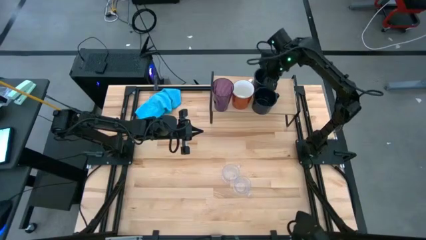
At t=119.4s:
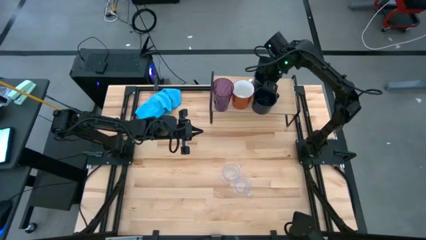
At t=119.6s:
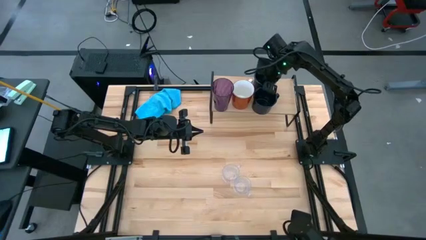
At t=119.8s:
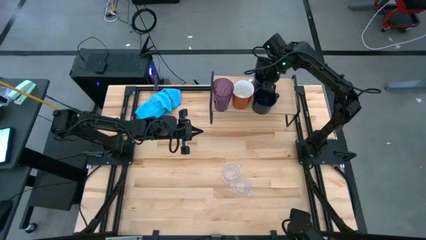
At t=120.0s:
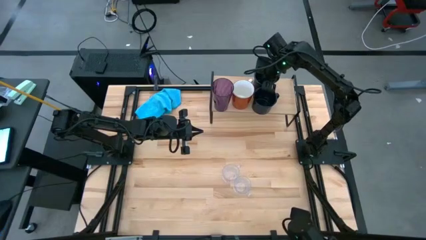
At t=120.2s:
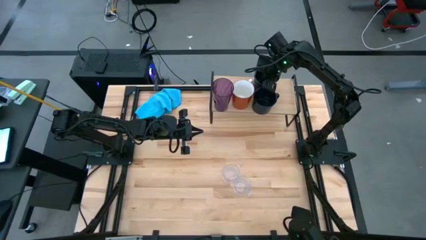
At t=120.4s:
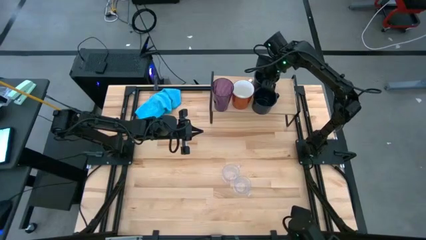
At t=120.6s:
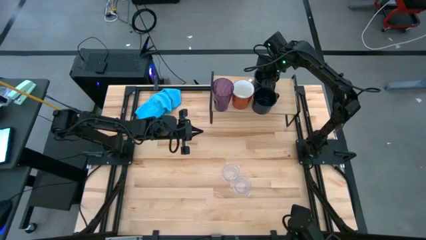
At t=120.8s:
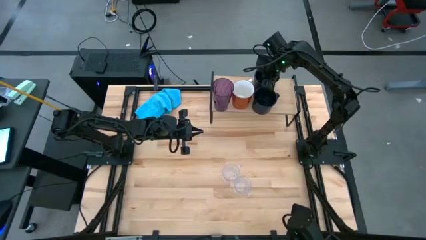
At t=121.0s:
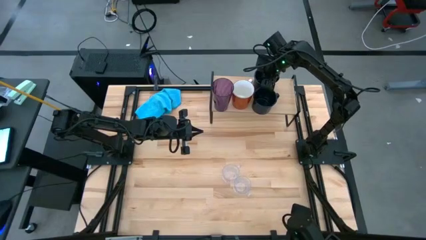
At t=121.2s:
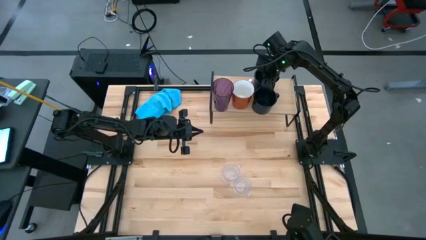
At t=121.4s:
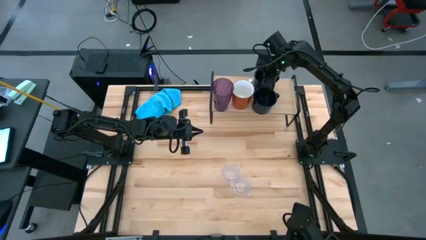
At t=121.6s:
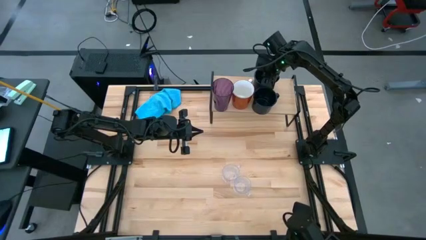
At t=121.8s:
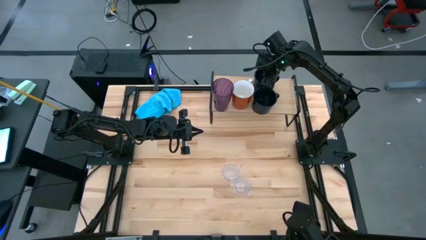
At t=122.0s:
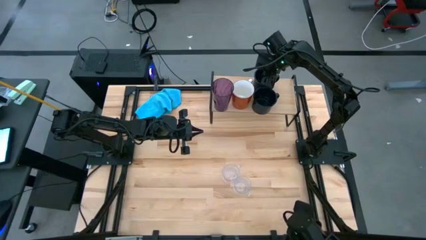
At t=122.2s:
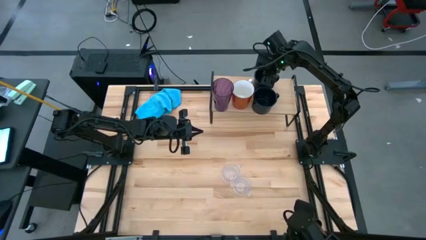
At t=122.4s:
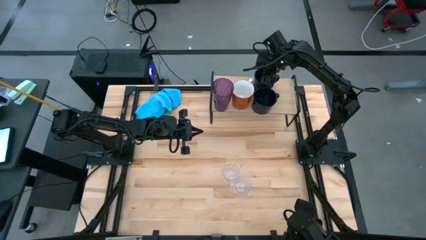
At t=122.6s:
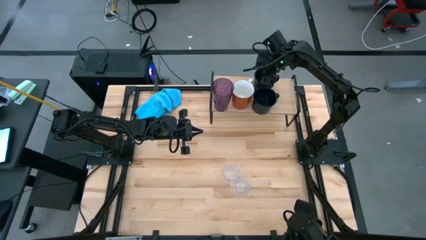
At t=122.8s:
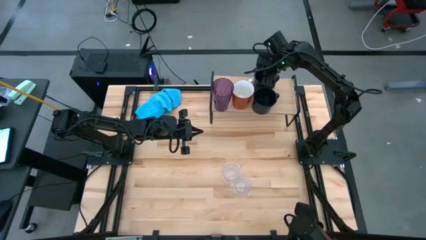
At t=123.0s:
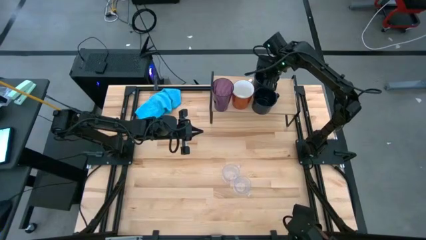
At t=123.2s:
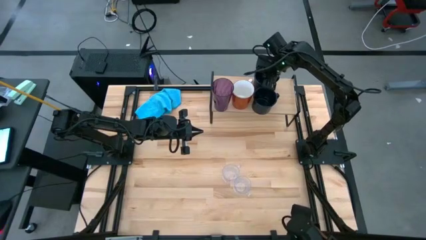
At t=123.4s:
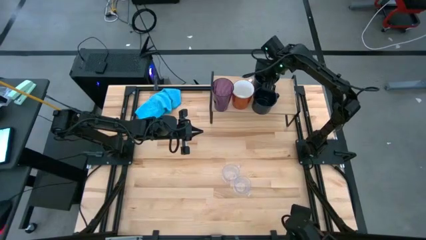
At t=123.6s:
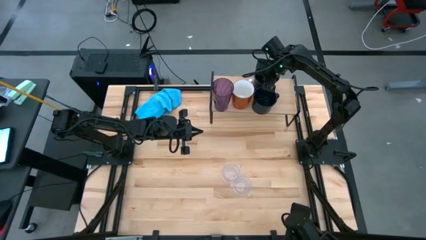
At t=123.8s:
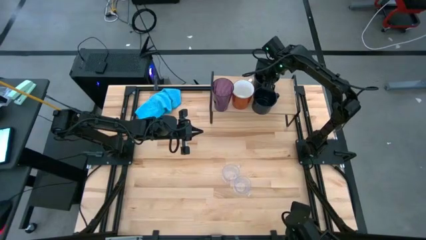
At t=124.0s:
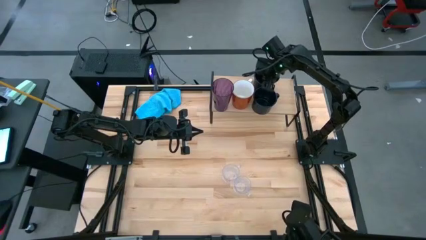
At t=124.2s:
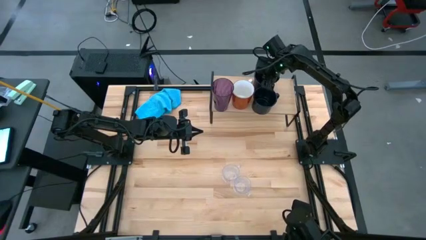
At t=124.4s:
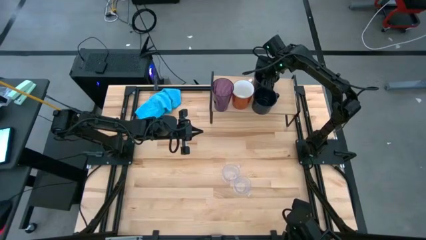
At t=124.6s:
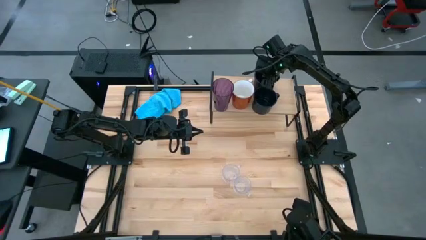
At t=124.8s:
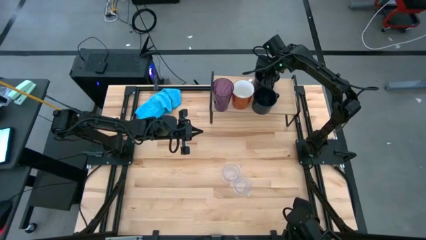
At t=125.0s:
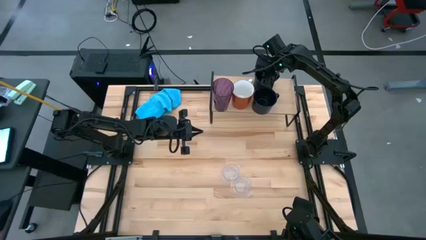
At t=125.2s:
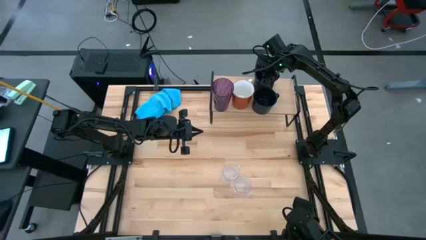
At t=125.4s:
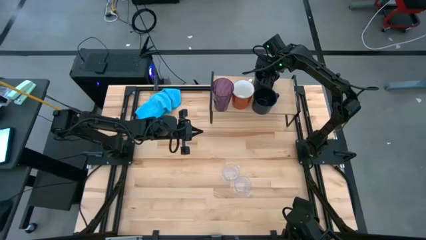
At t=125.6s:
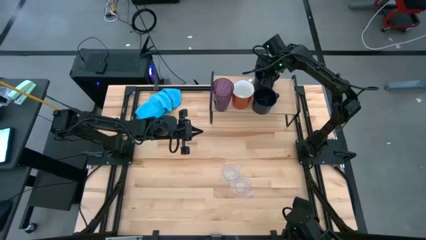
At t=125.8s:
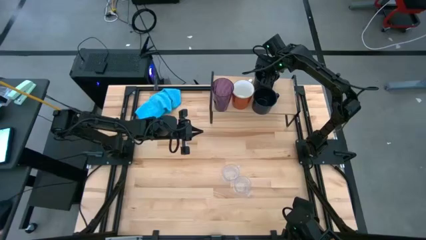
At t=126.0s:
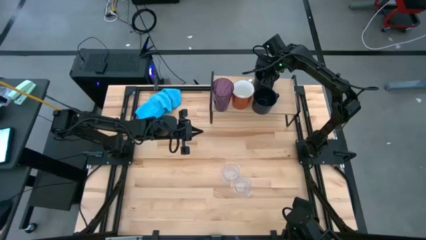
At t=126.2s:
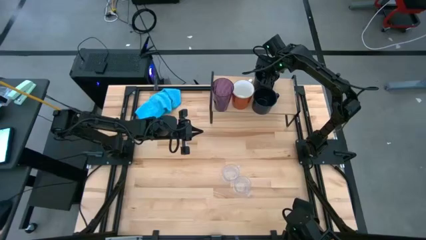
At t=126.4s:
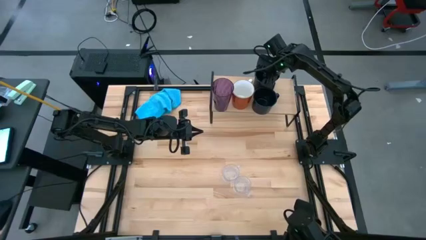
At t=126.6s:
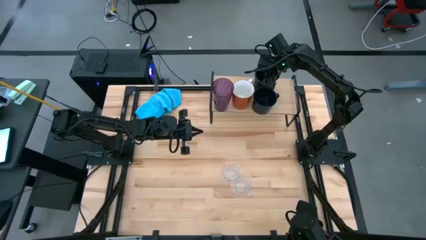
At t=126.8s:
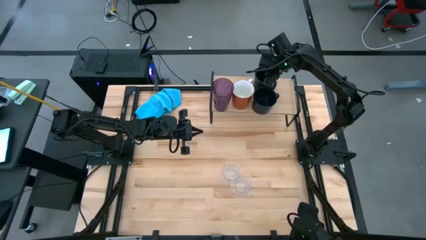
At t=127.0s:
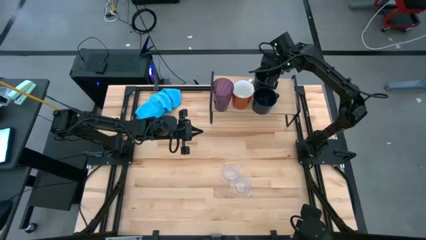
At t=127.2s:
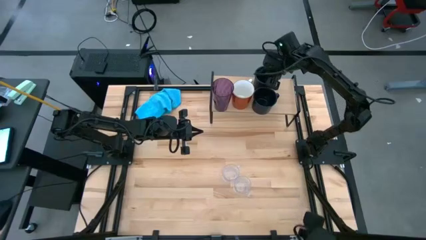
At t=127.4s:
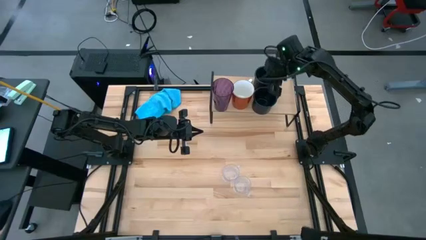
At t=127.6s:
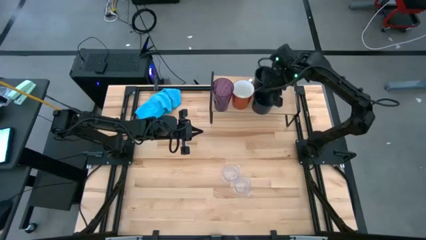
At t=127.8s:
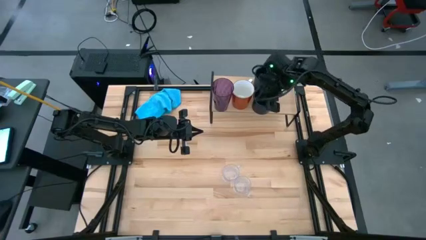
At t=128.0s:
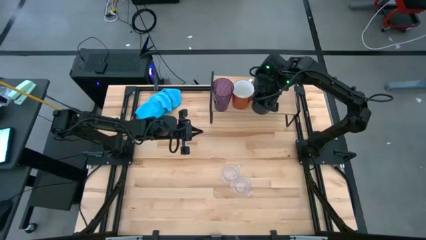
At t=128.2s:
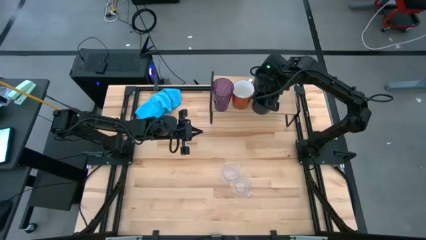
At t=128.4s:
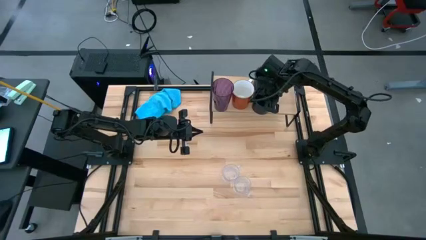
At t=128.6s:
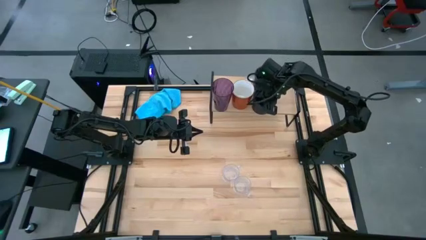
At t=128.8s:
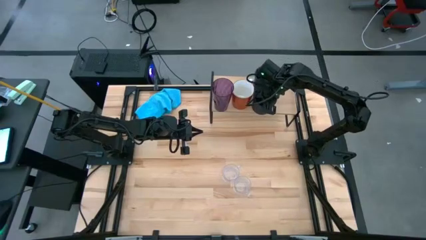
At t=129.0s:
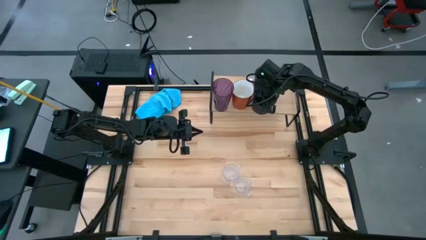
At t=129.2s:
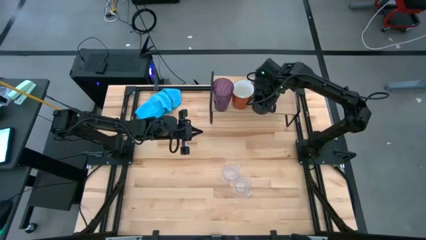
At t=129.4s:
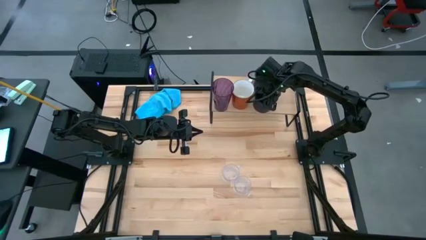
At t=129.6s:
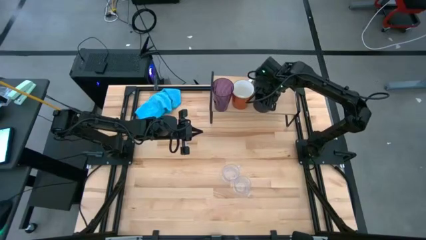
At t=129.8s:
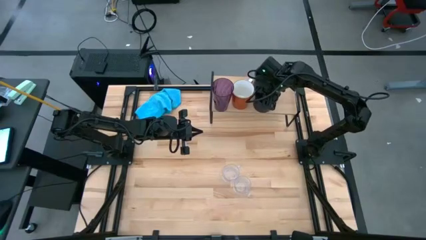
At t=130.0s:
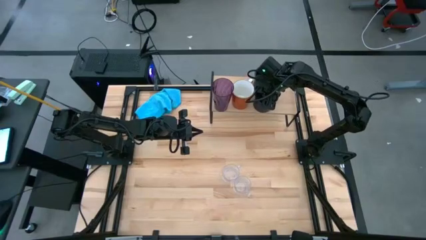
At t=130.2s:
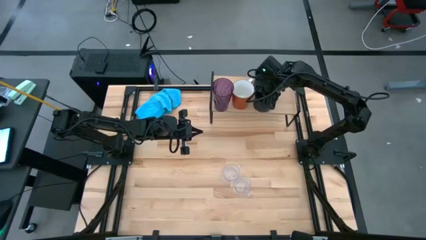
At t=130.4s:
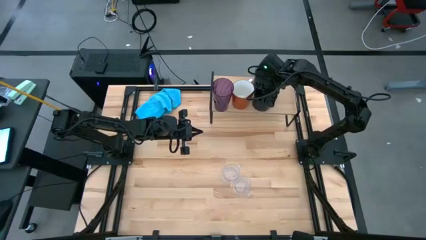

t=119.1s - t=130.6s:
Task: Stack small to large cups/mugs on shelf
Adjust the black mugs on the shelf
